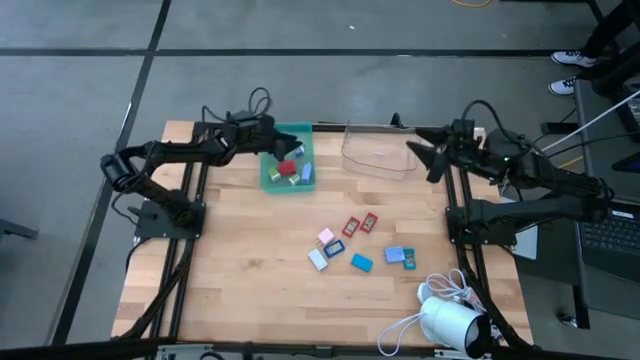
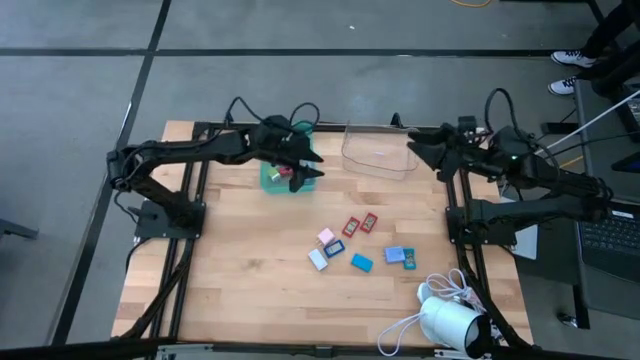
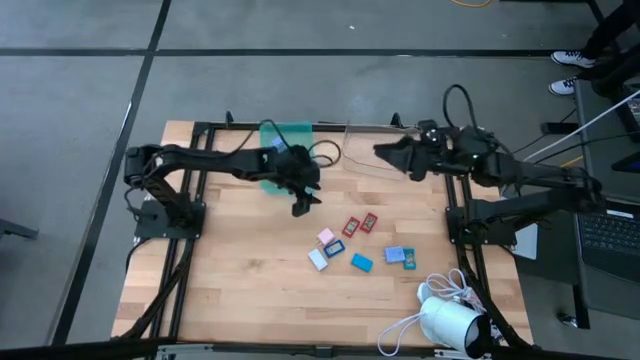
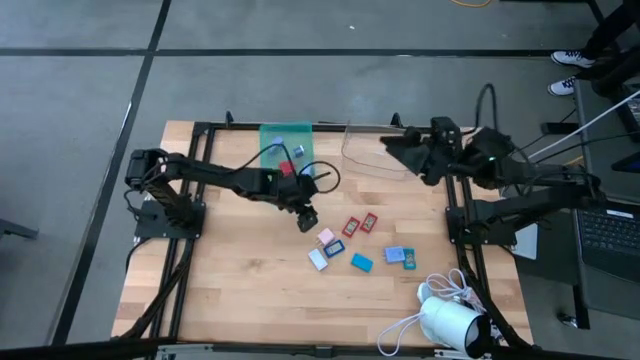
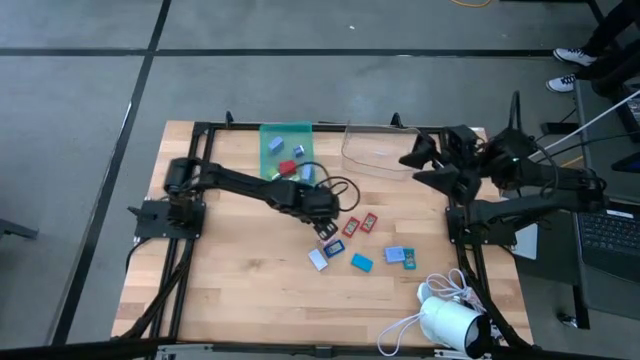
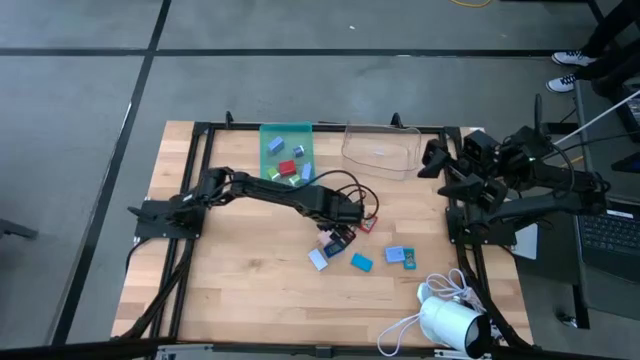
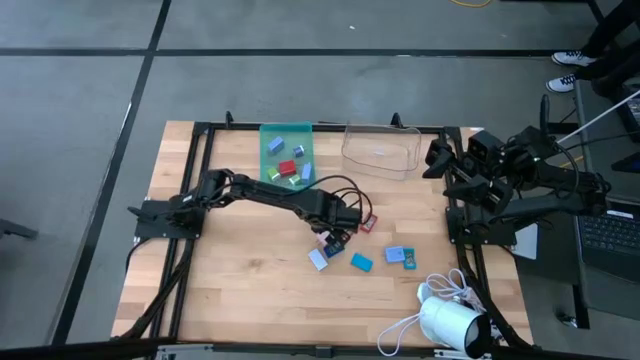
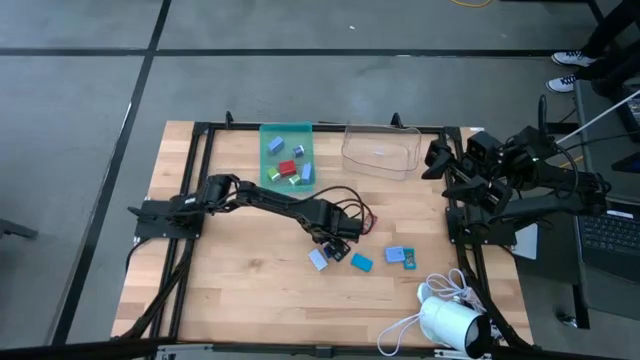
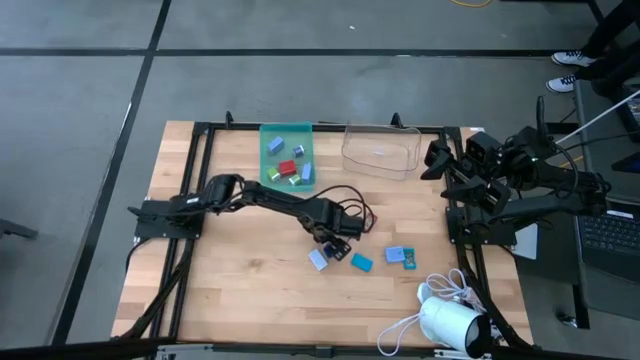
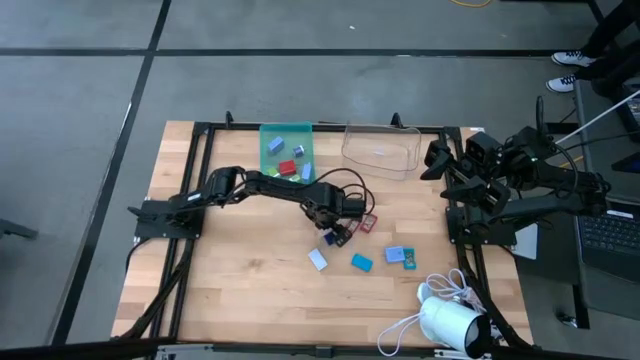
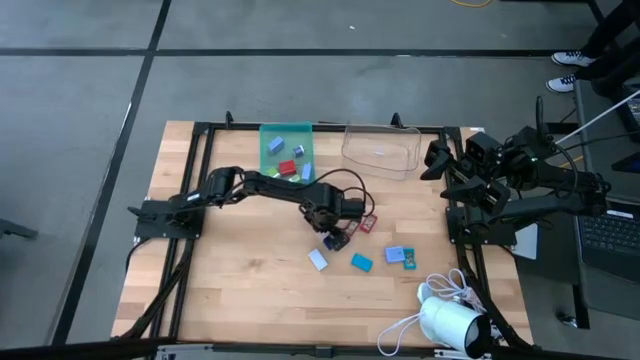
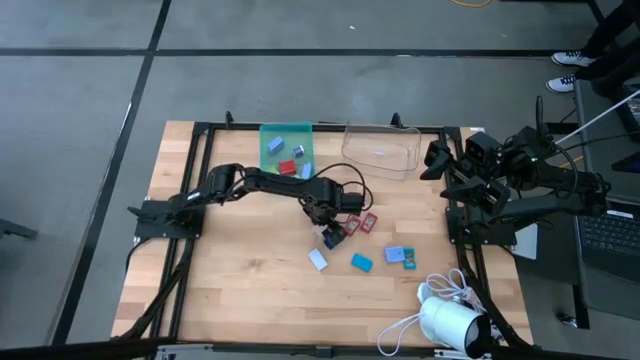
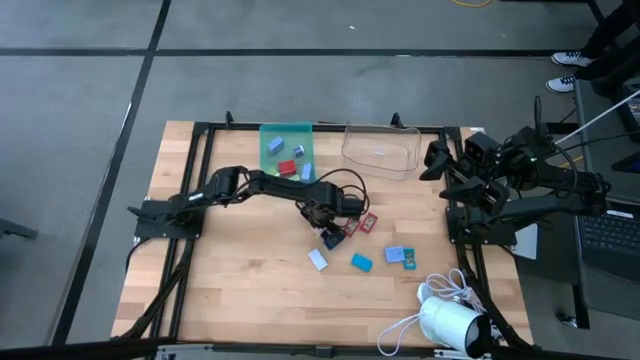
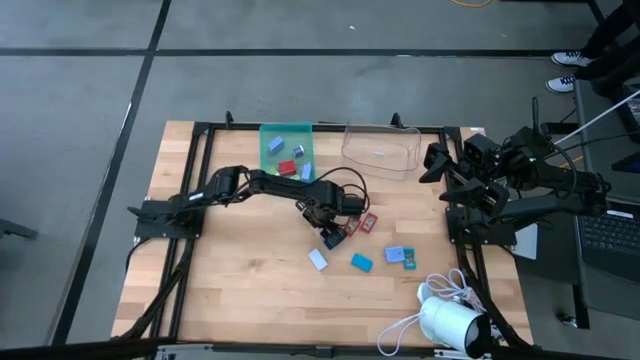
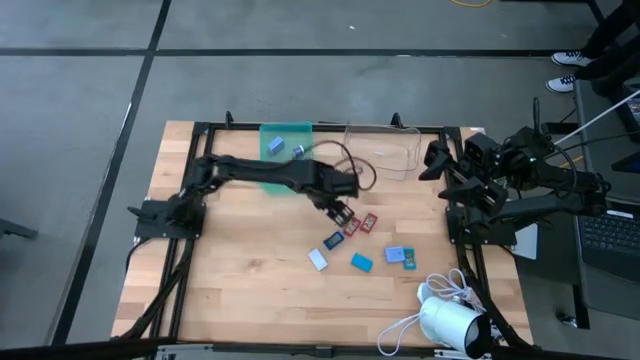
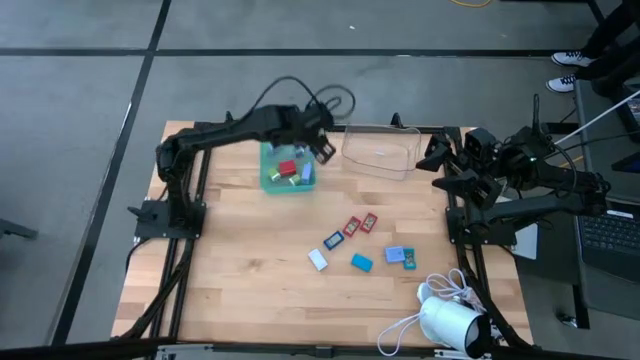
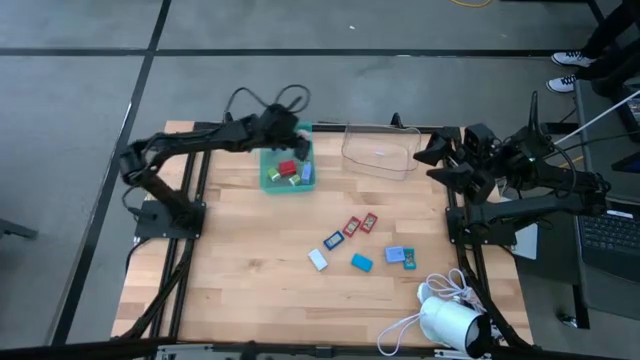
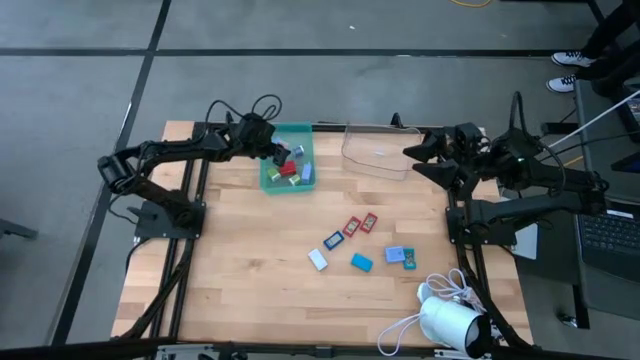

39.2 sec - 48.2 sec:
Task: Pick & Place Office items
Put the pink charger adapter into the green bin

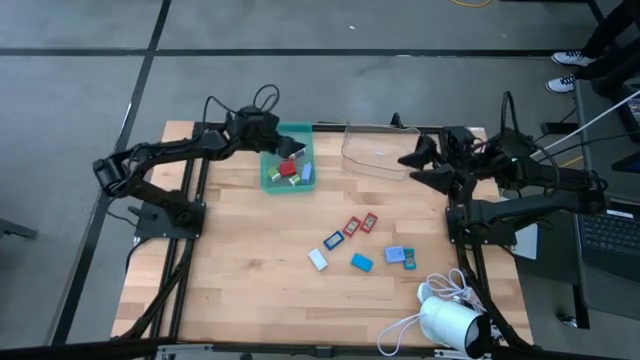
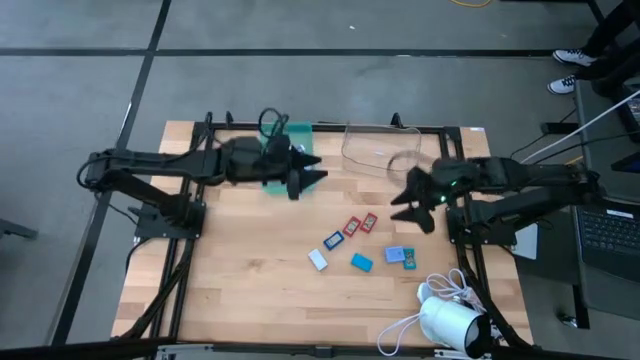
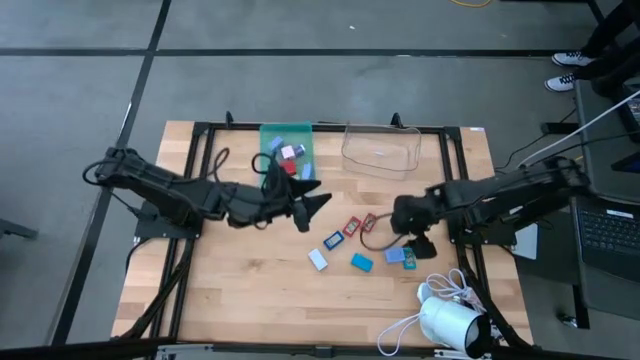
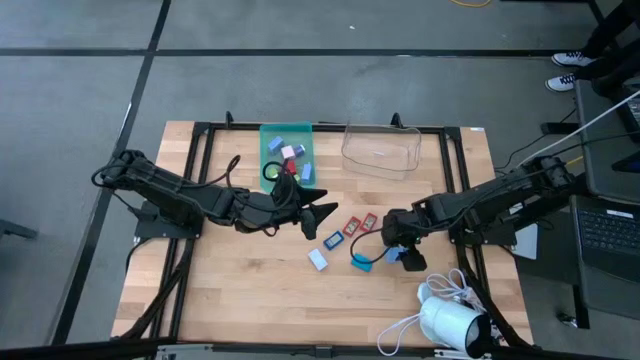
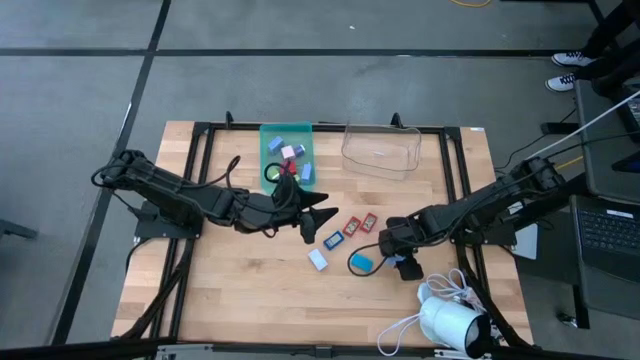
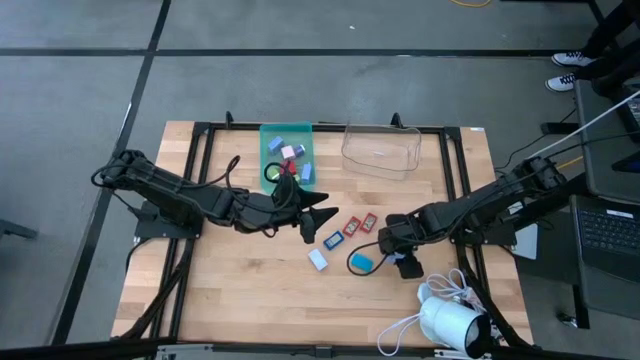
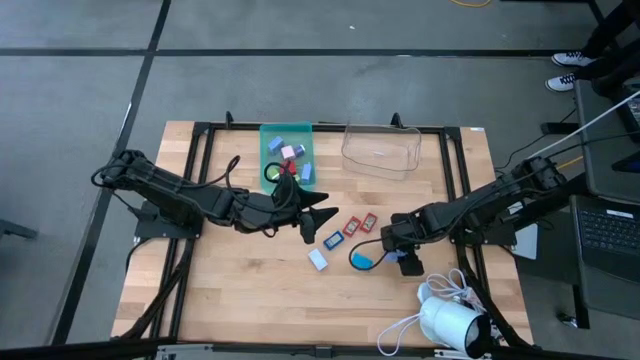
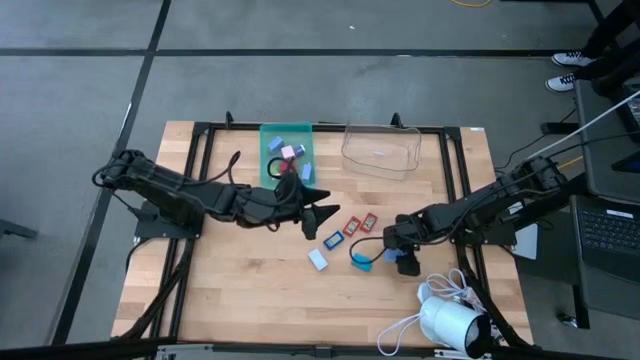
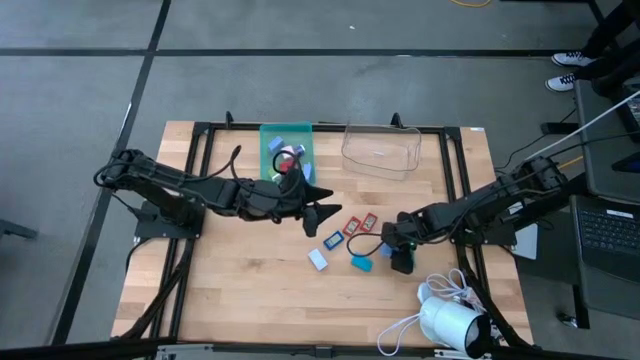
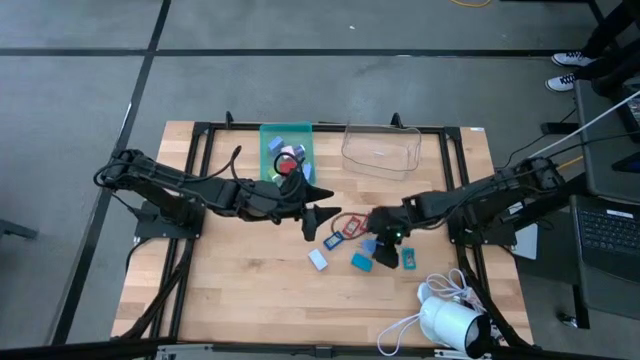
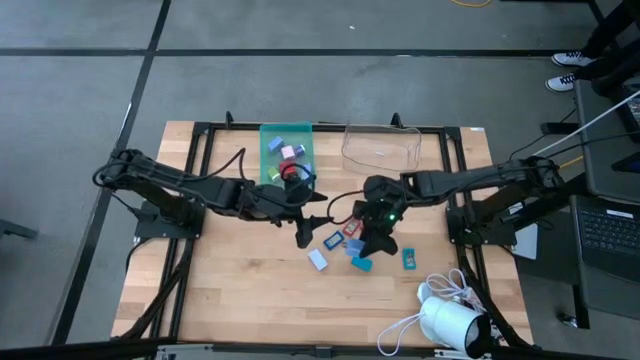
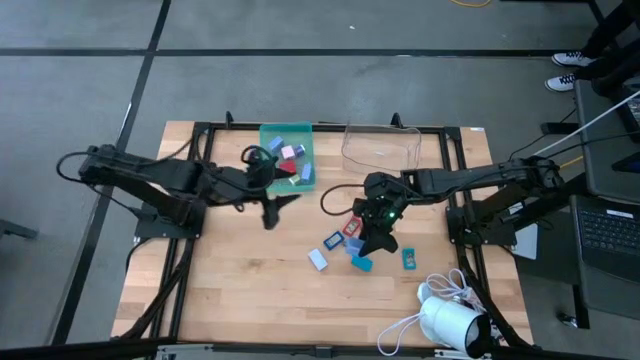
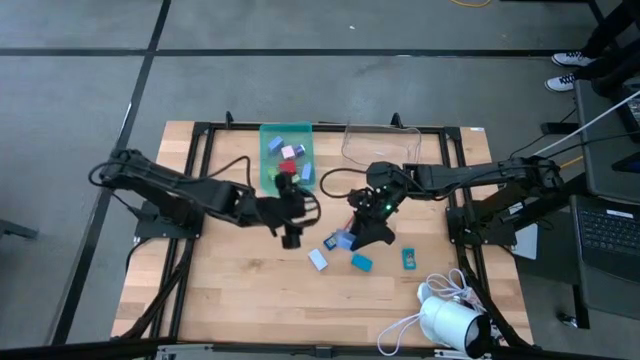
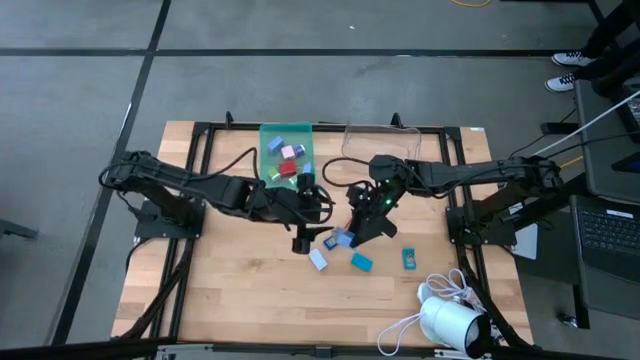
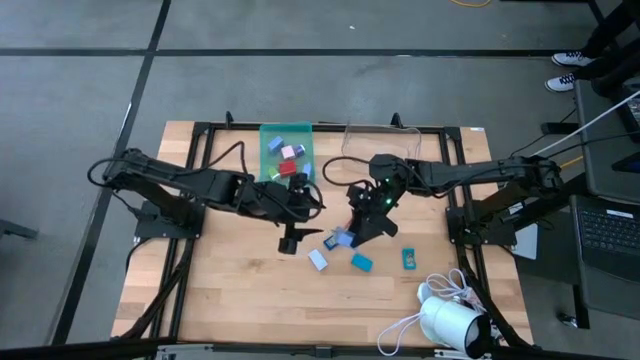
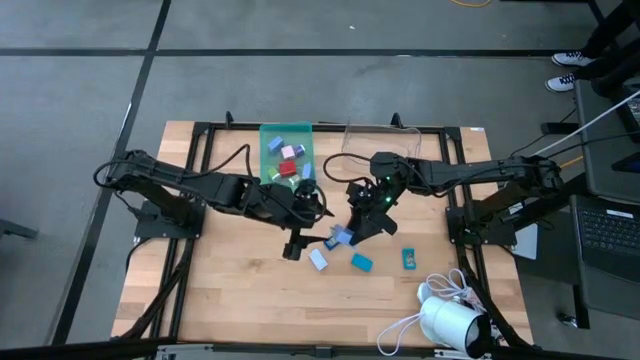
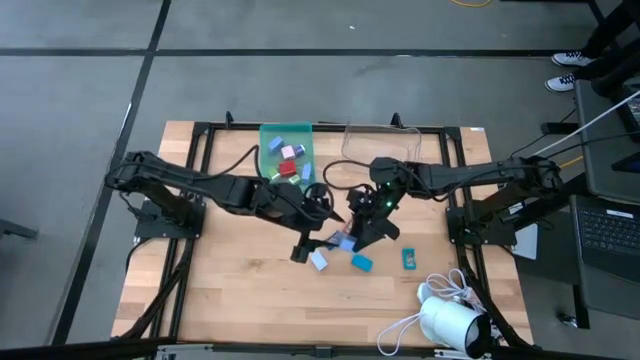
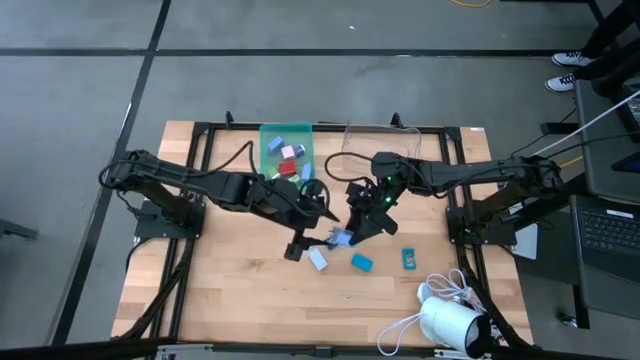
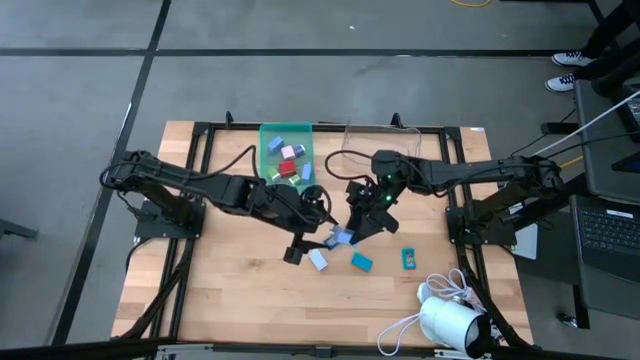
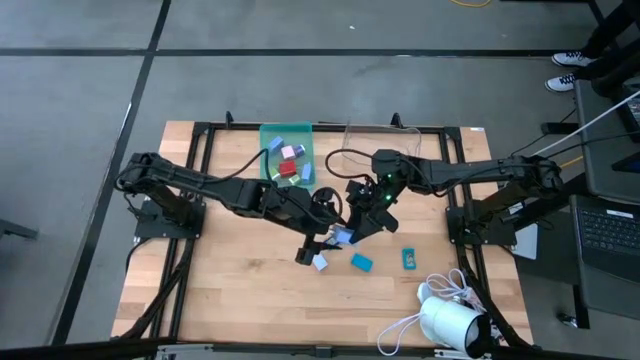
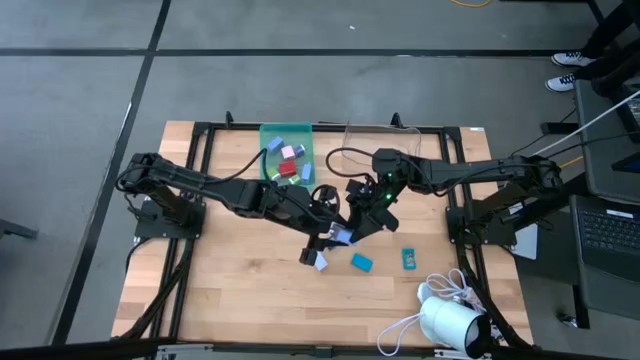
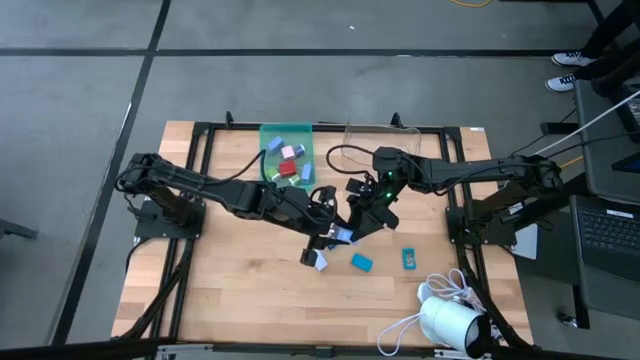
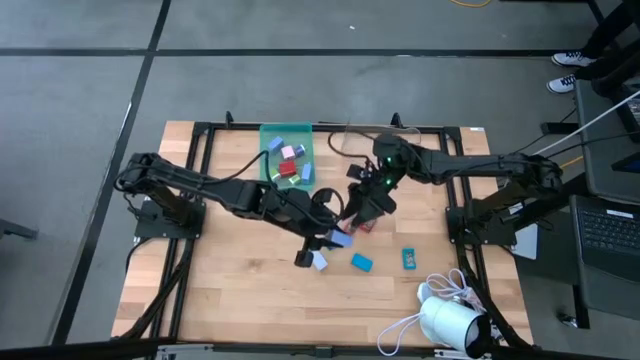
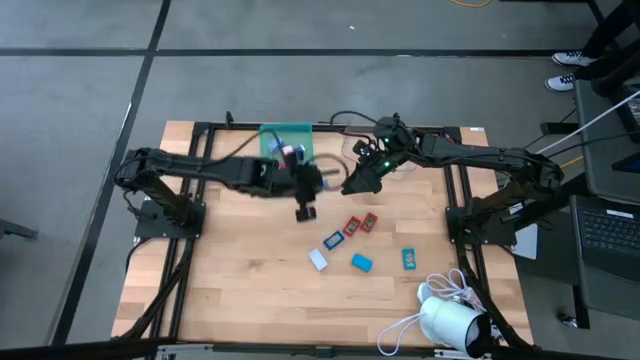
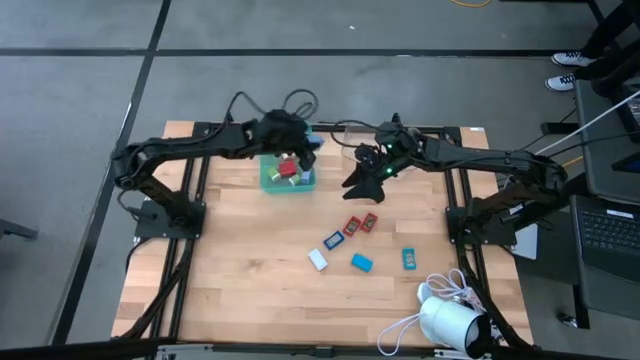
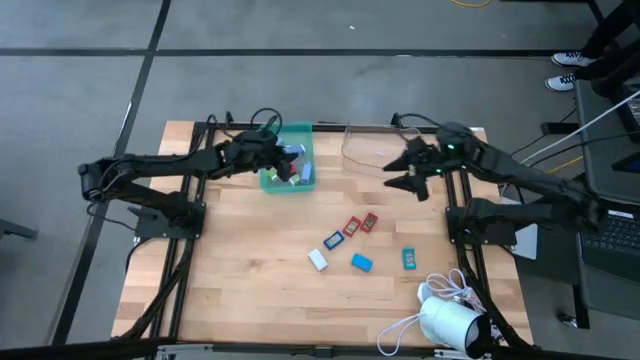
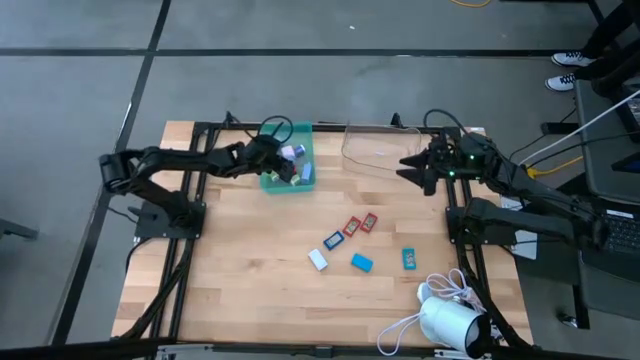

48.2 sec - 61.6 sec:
Put the light blue charger adapter into the green bin
